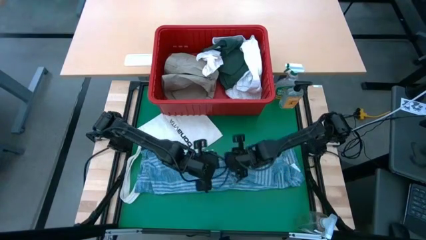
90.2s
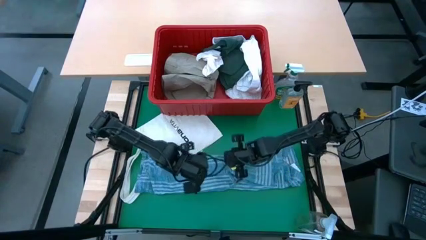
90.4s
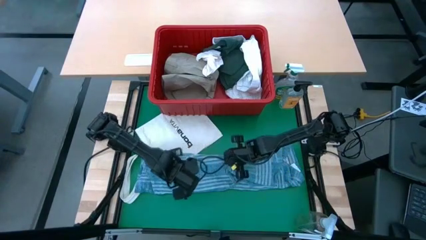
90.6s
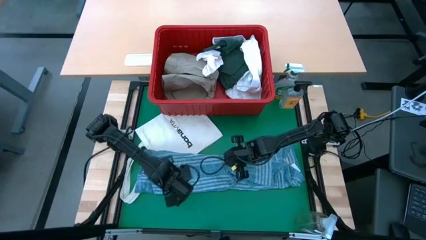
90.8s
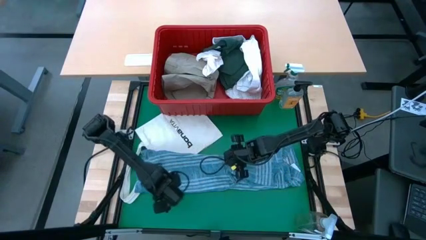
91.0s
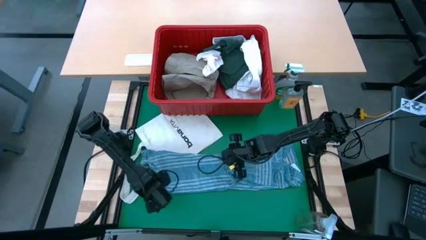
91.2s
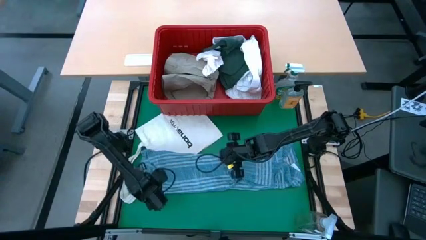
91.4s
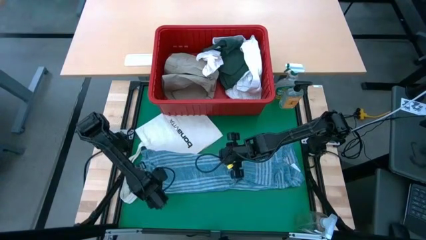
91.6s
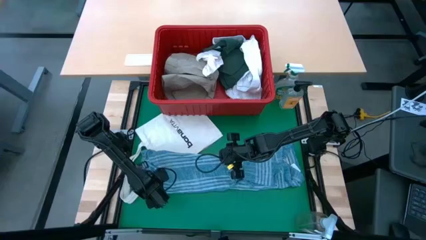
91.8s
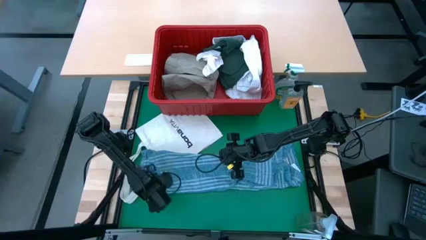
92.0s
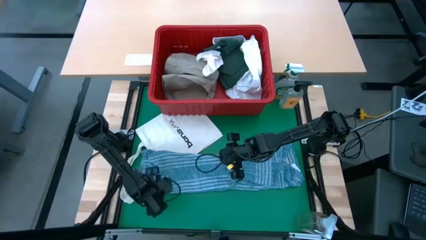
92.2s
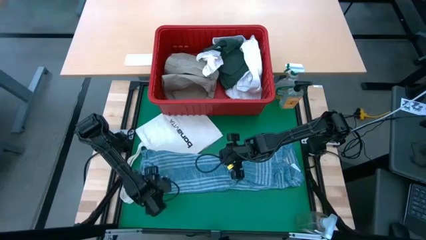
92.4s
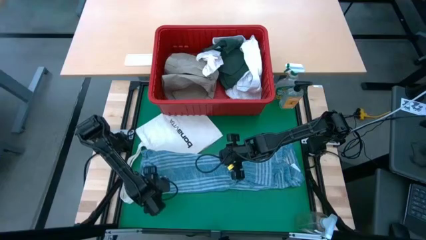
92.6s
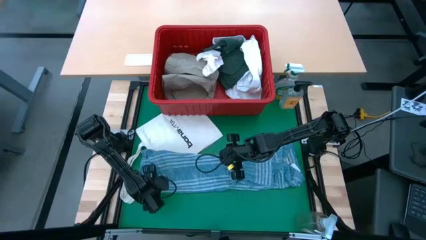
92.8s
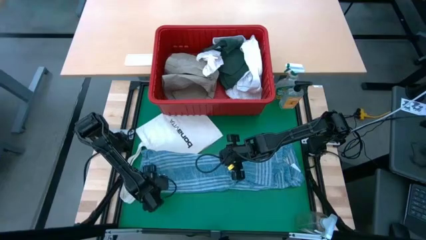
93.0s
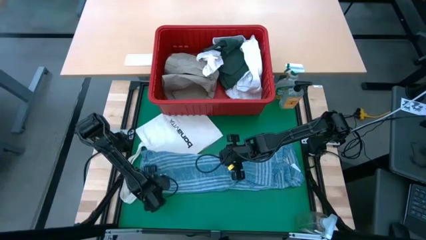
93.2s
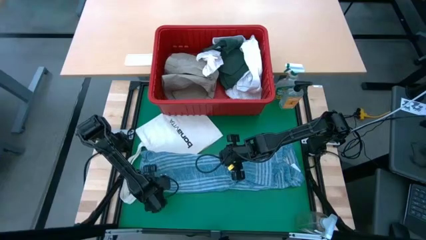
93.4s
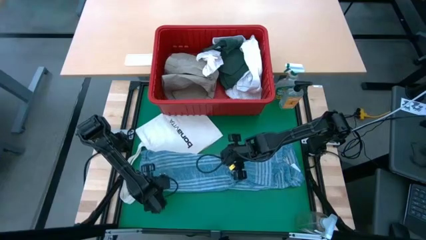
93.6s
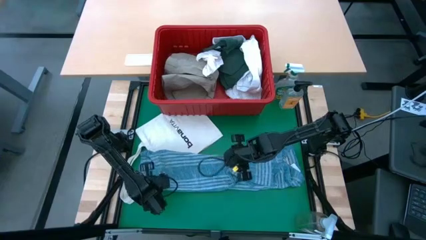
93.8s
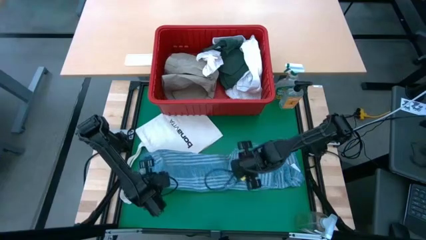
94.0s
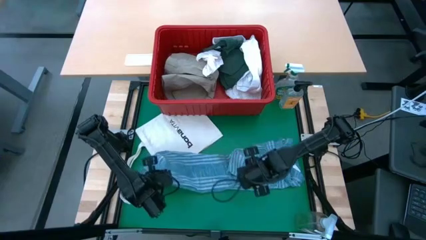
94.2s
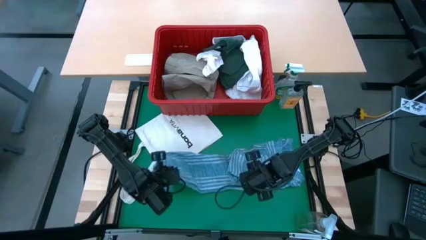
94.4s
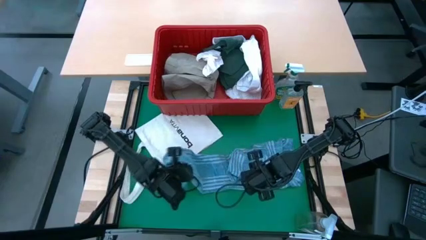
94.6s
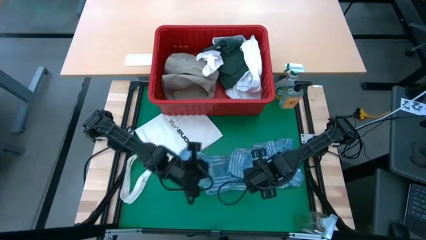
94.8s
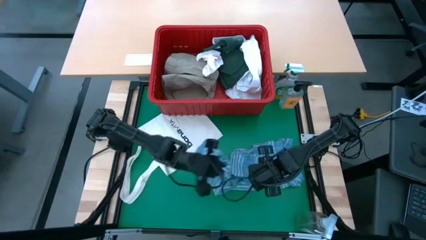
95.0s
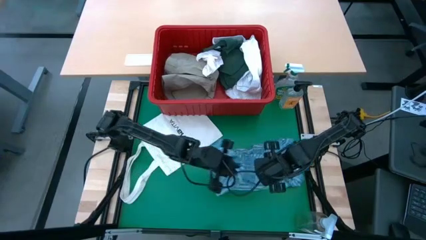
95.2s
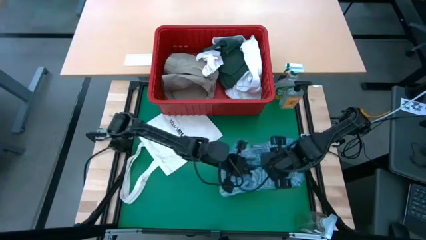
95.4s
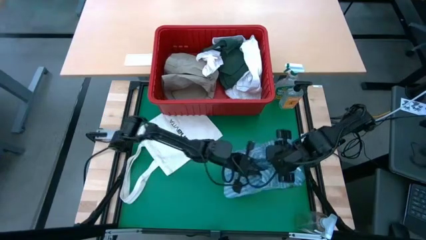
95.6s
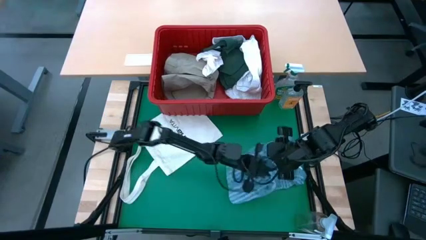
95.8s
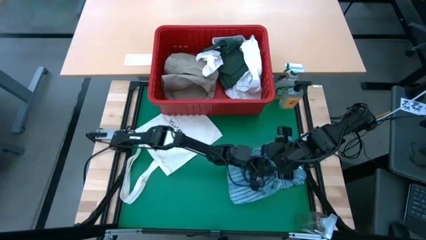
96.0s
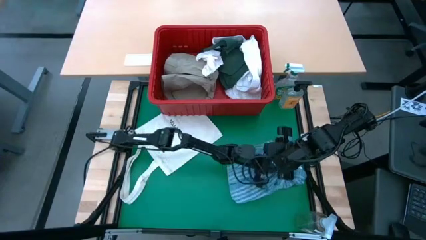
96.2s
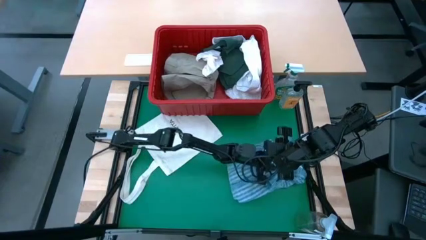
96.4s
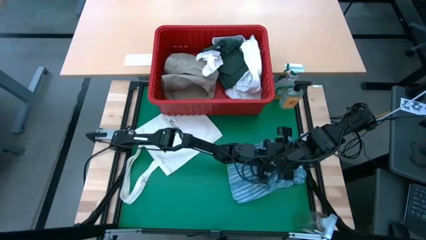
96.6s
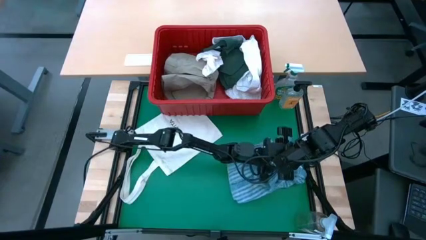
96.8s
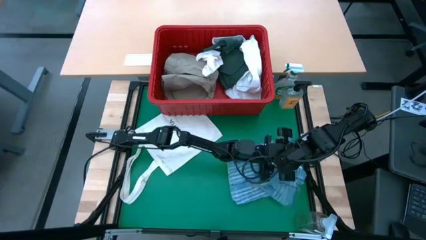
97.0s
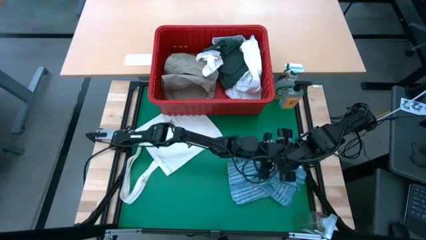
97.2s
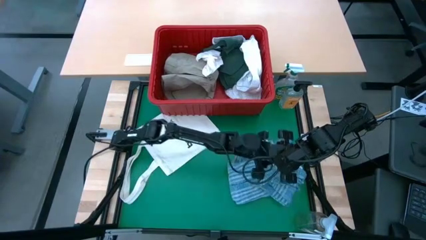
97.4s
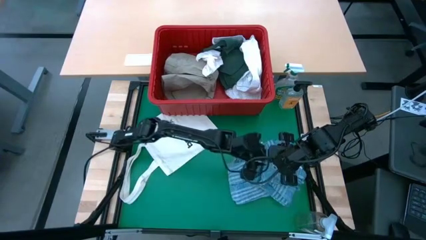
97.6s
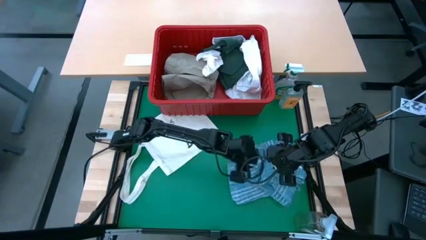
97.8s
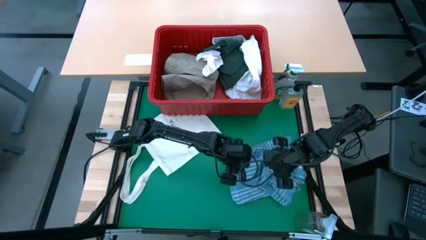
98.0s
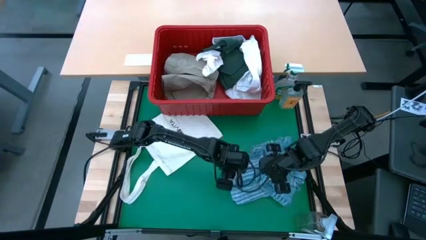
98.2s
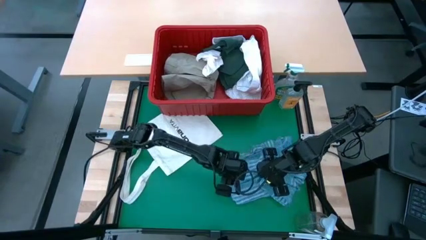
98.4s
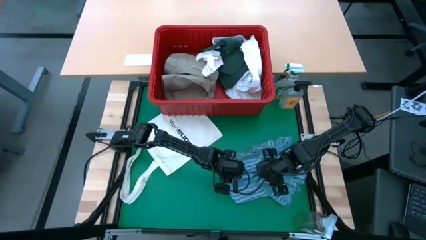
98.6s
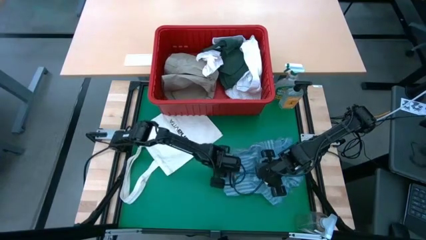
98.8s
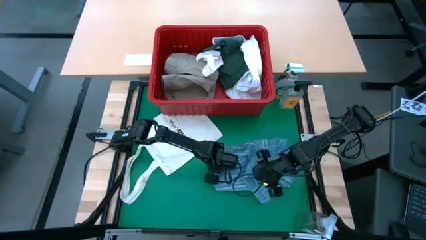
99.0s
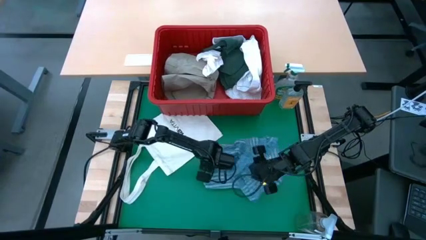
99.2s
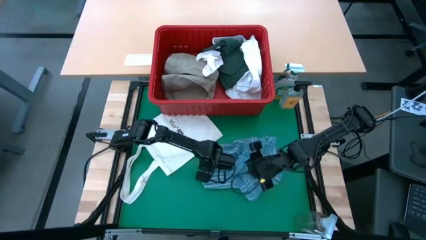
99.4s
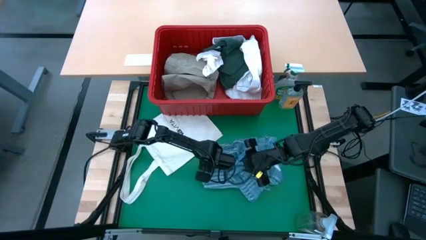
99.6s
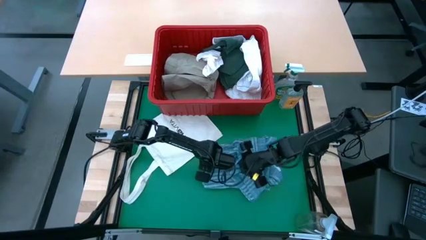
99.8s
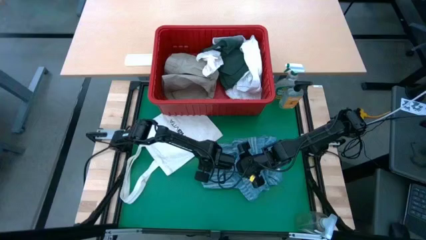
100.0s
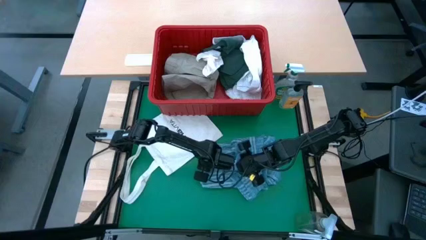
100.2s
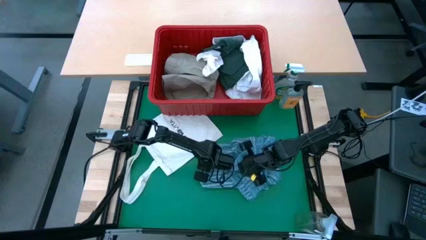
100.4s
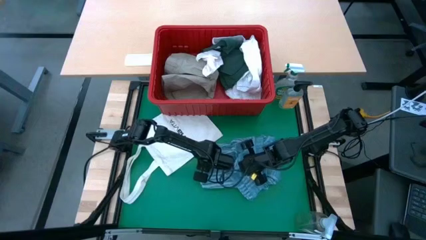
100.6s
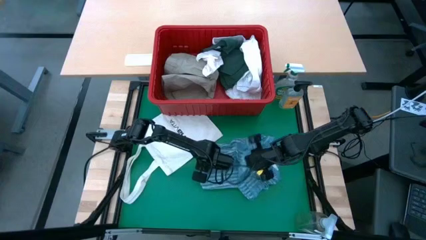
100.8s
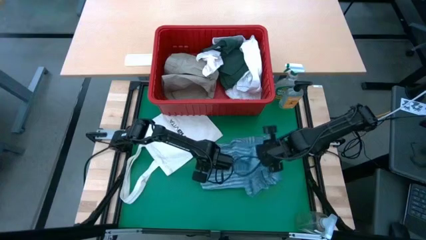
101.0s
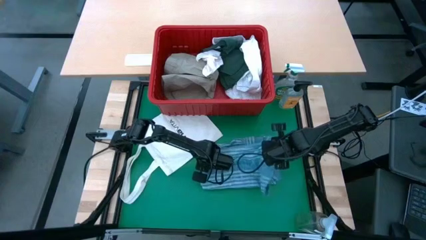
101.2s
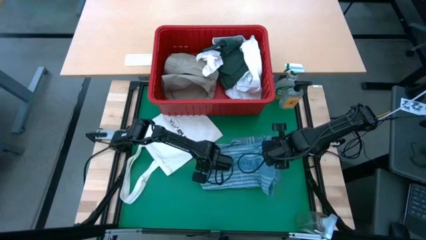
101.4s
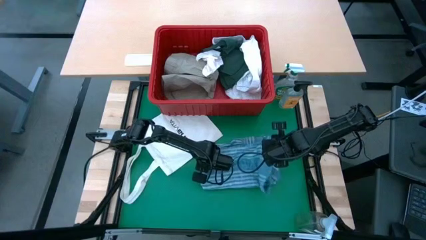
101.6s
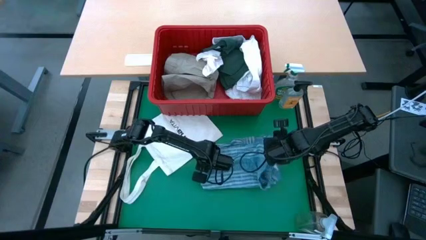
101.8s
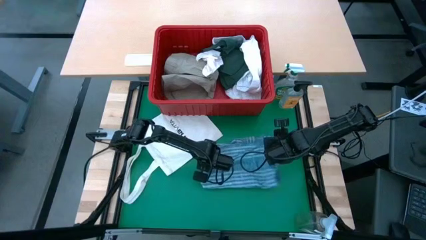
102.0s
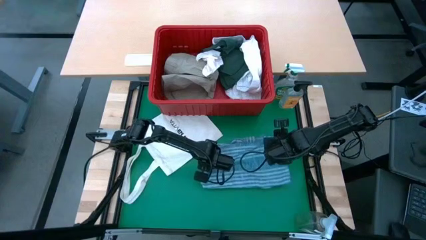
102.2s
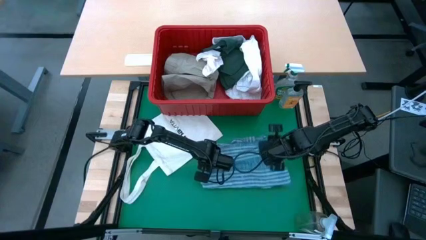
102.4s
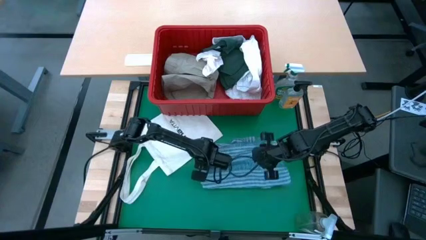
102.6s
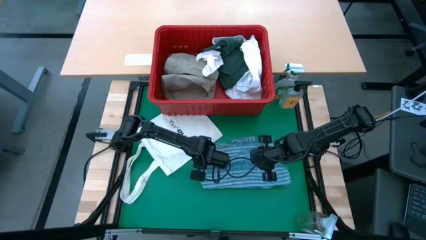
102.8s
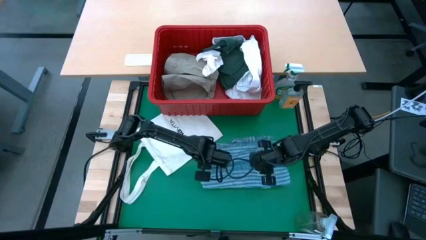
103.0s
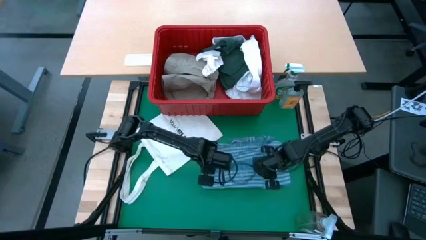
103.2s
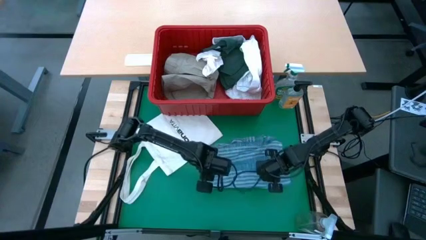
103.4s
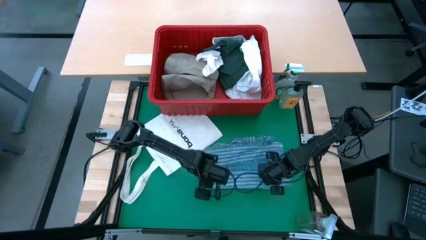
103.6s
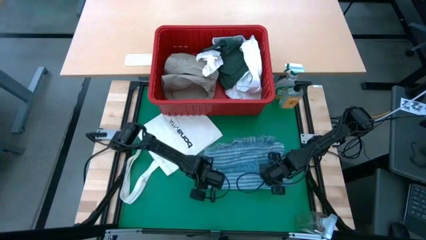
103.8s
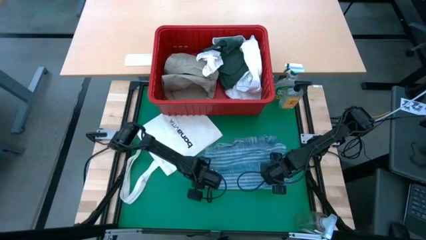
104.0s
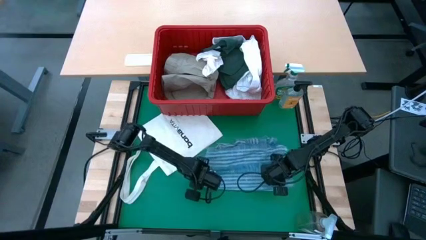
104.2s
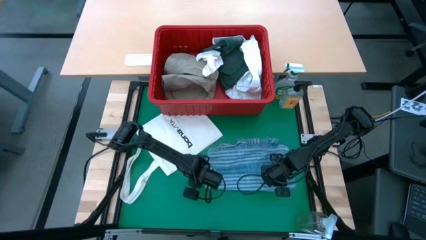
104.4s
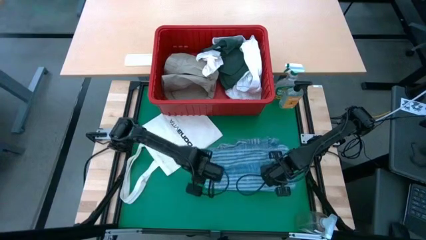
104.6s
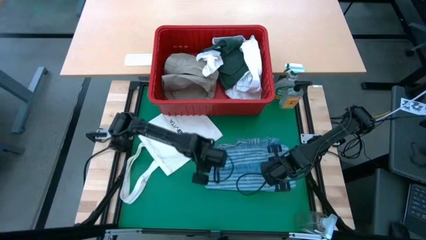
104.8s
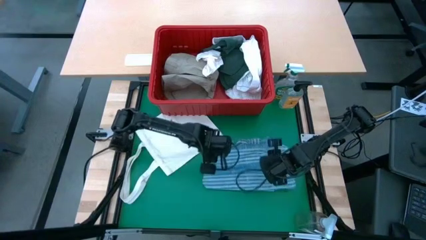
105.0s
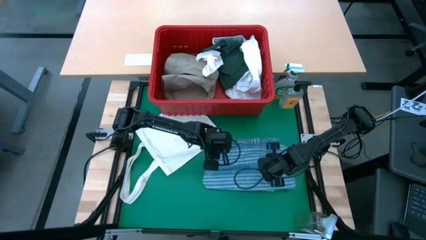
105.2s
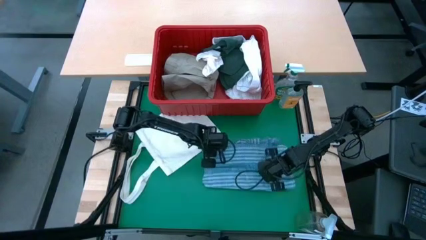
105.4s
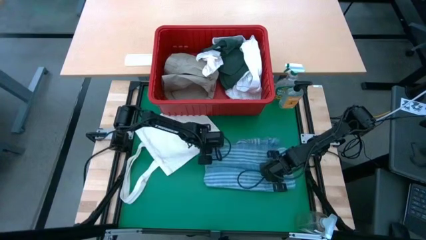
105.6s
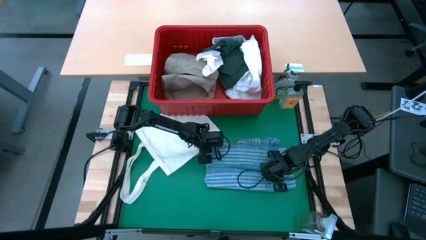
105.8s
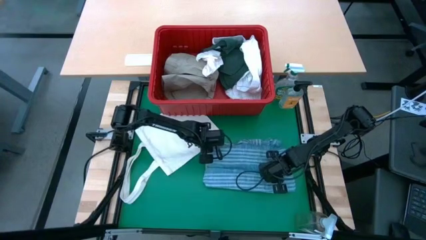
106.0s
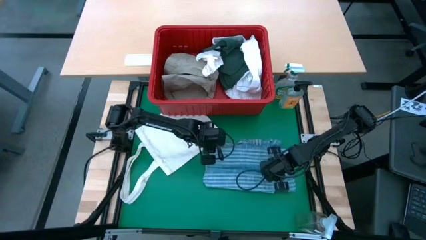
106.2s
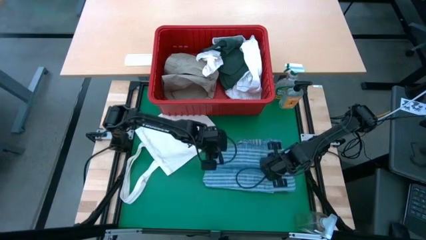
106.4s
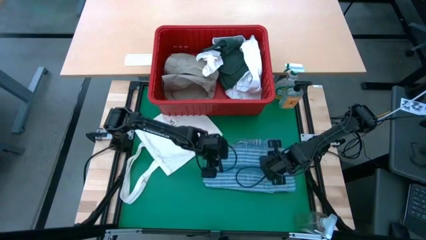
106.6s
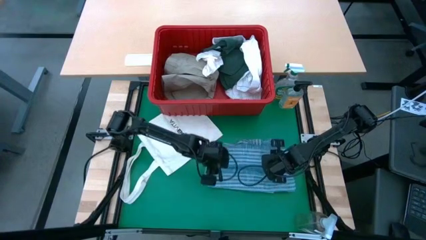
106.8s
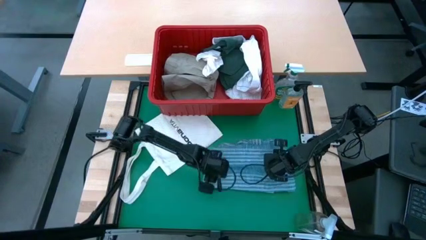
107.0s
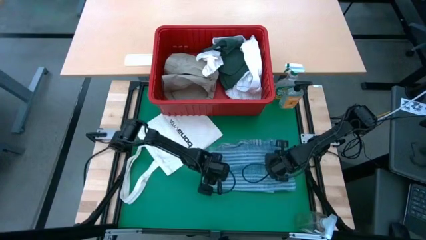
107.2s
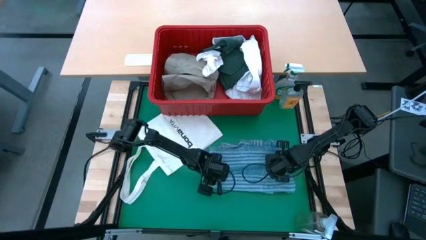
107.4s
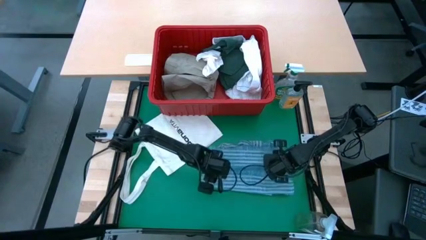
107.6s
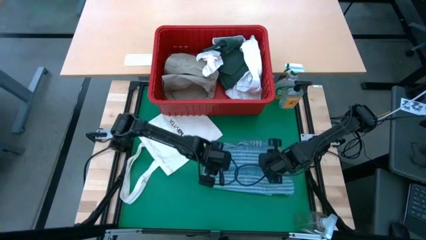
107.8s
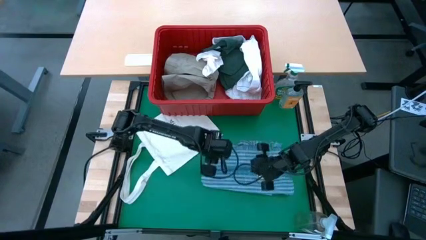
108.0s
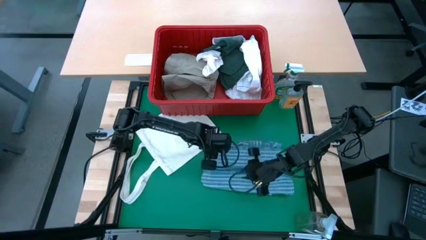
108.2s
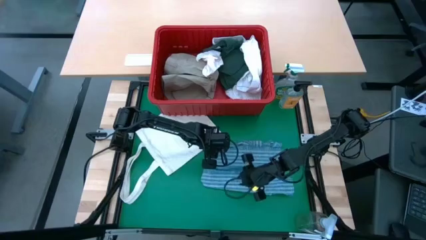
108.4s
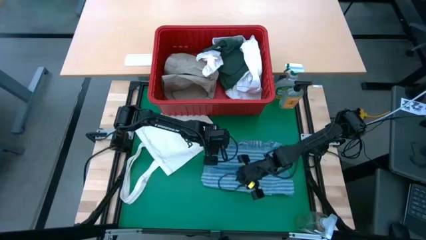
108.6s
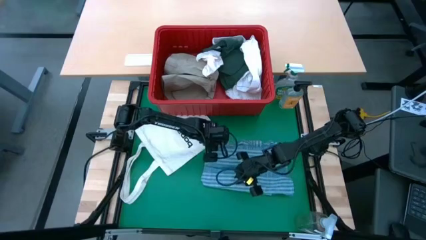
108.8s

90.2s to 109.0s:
Task: Fold Laundry from Bin
Fold the blue polo shirt
